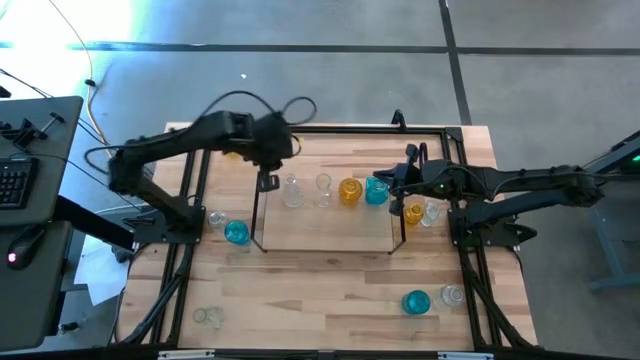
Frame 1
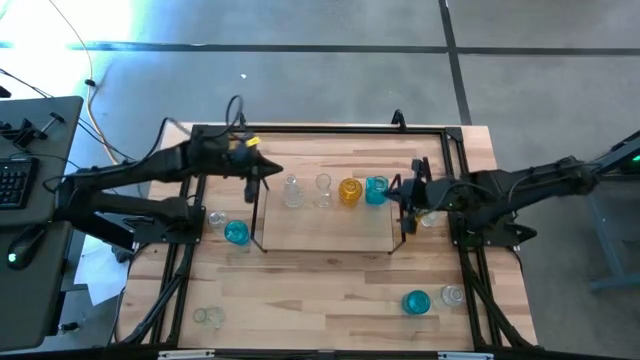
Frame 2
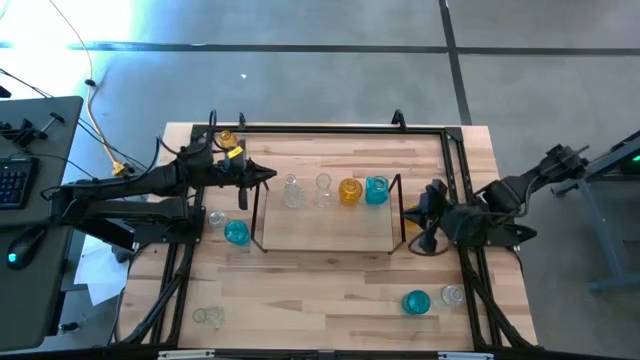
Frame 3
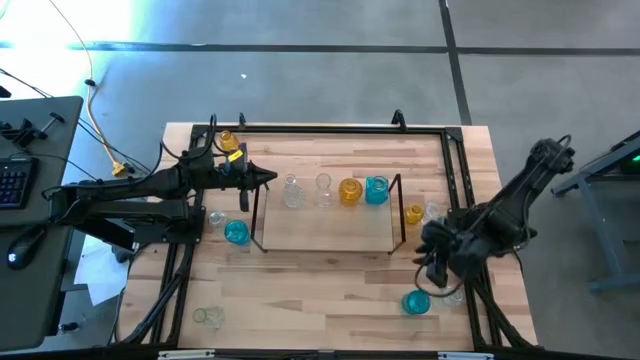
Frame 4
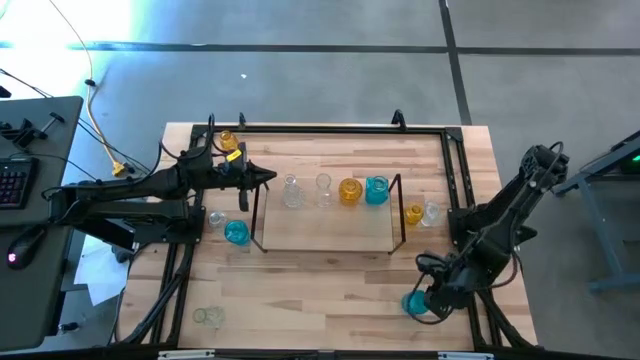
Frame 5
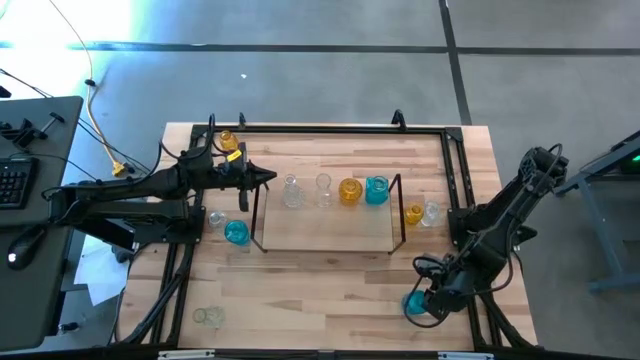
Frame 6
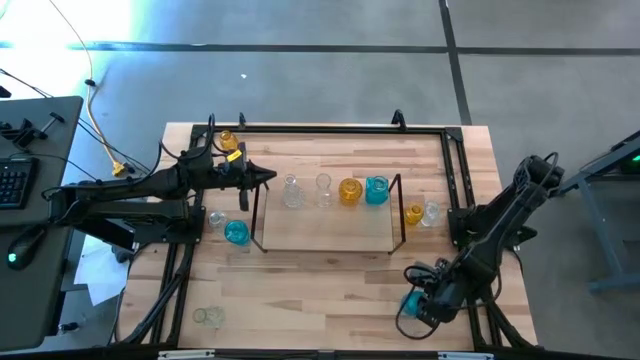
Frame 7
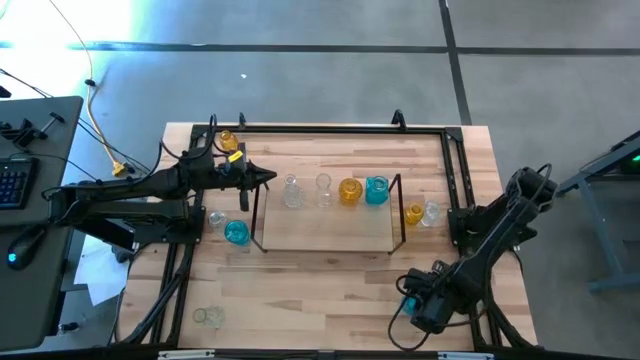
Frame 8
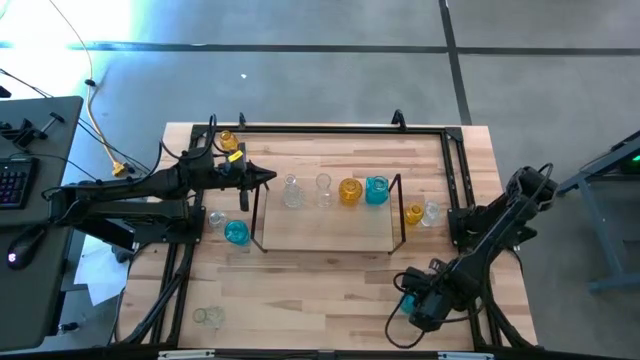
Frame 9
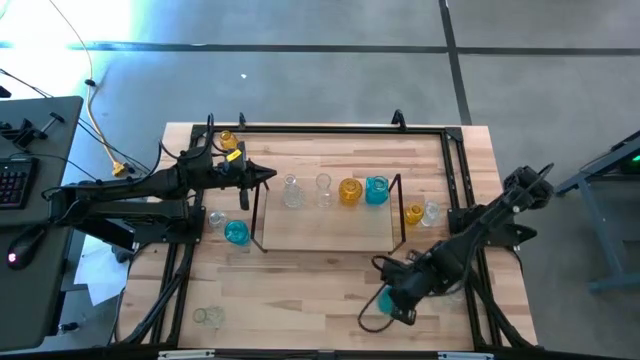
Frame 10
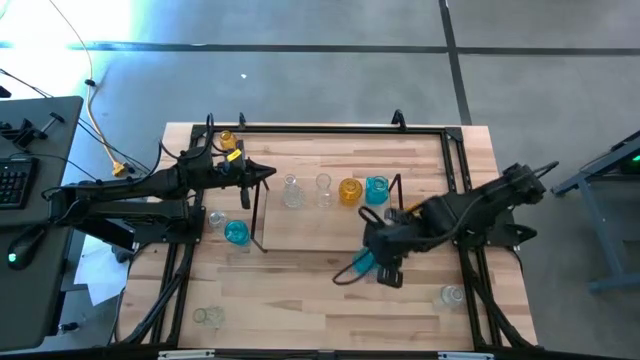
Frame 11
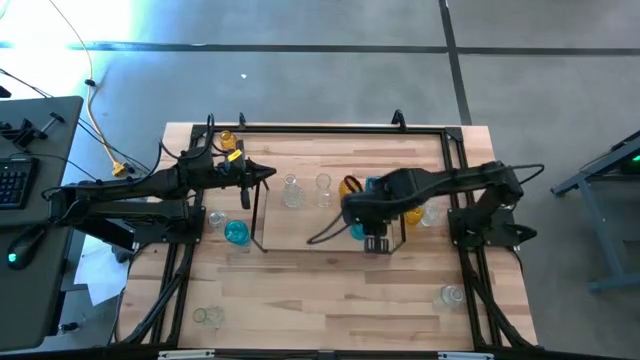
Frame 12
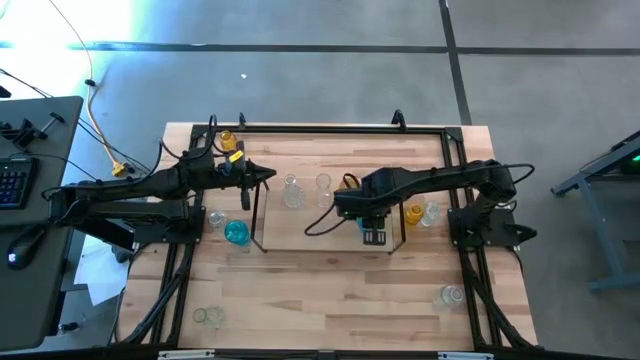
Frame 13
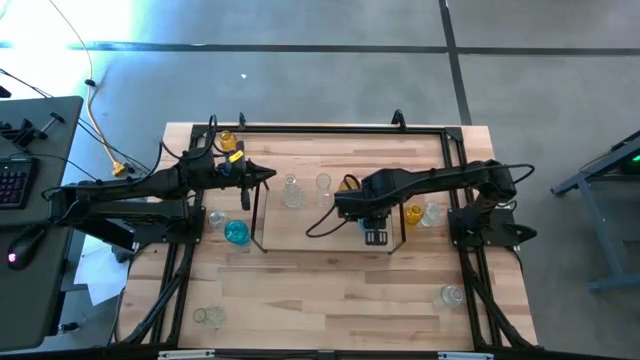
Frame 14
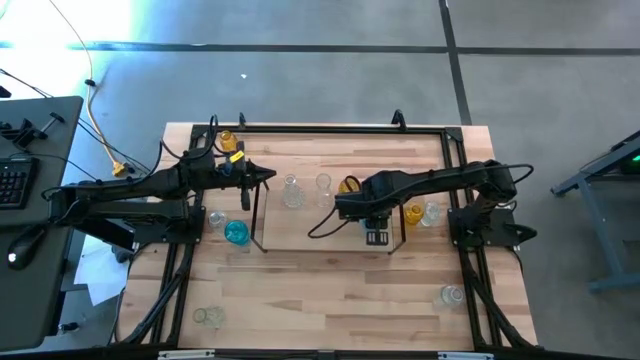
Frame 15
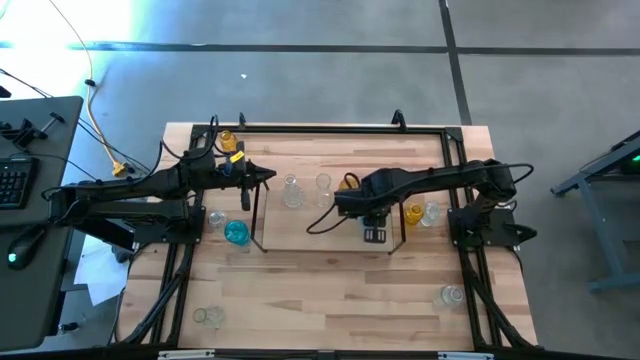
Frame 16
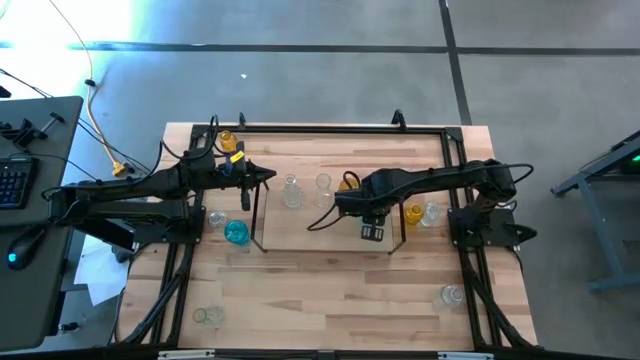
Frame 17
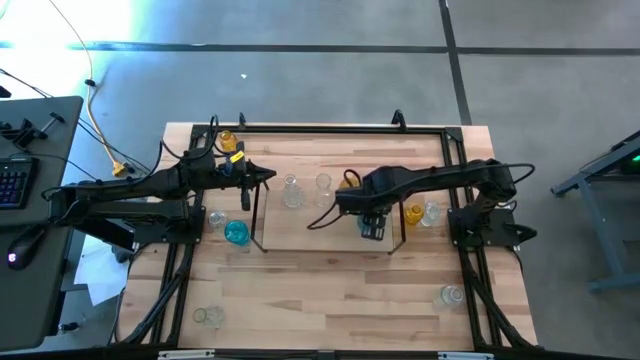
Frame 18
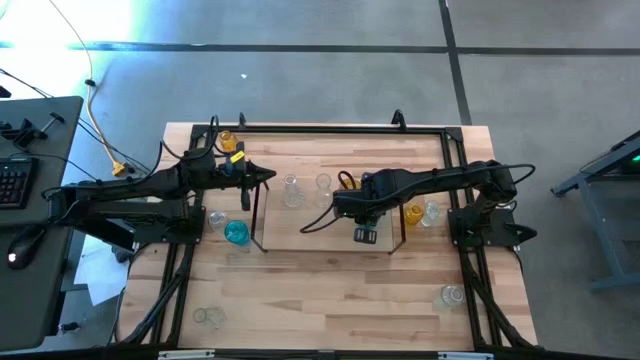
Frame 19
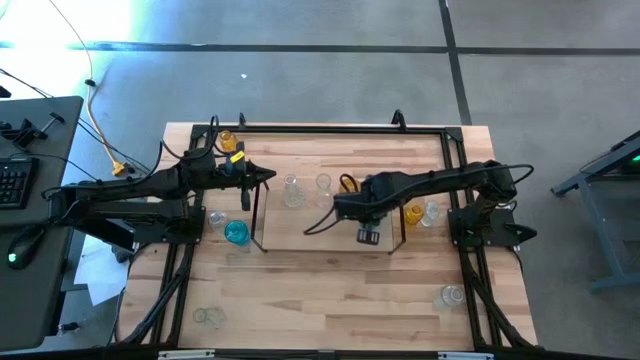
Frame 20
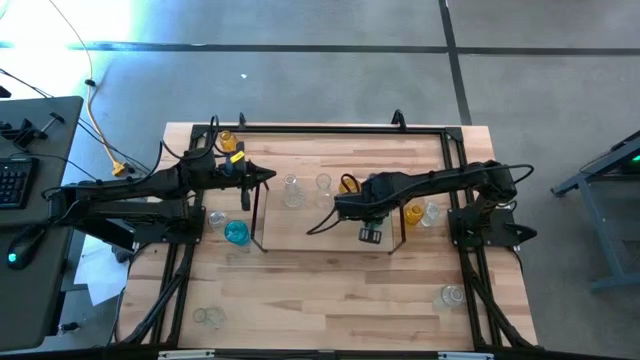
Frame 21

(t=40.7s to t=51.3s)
Task: sort vases onto shelf
Put the blue vase on the shelf aligned with the other blue vase

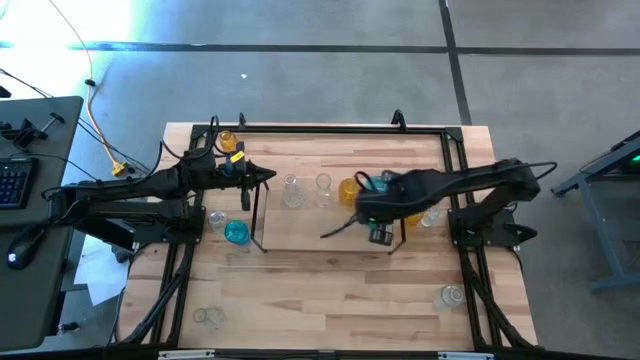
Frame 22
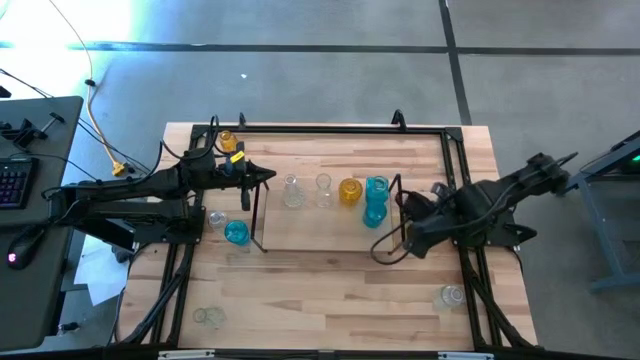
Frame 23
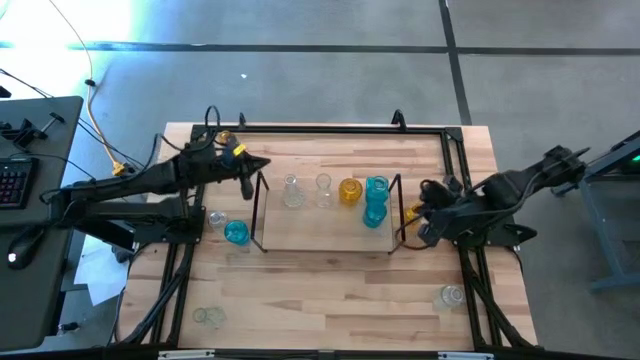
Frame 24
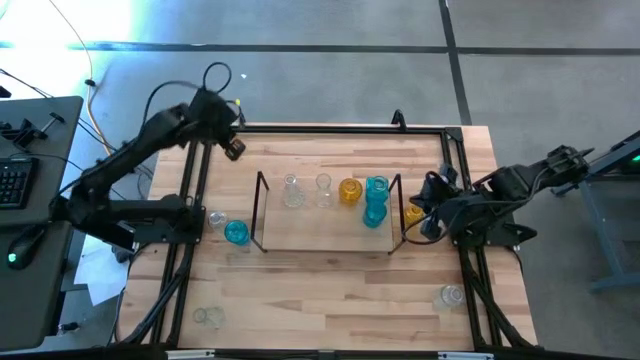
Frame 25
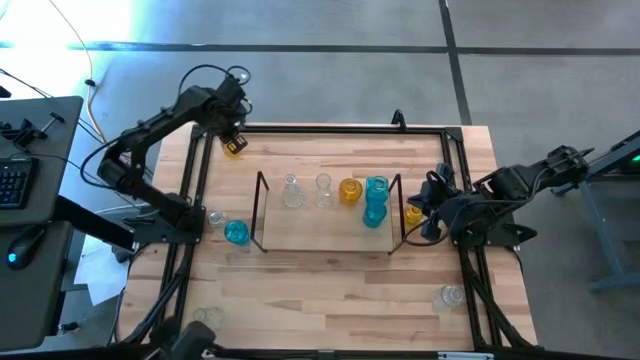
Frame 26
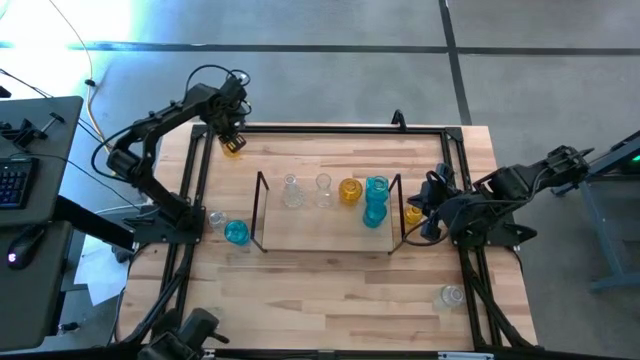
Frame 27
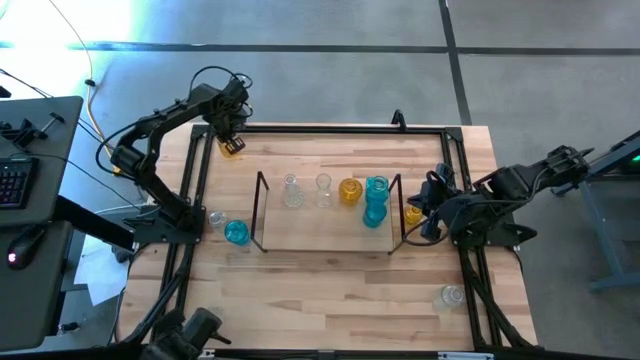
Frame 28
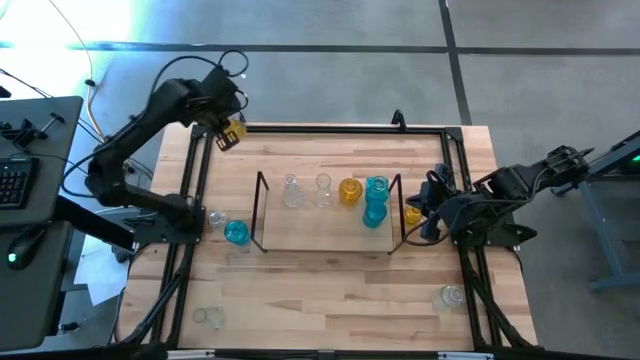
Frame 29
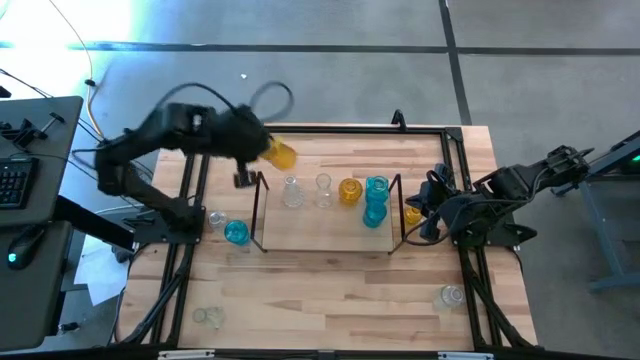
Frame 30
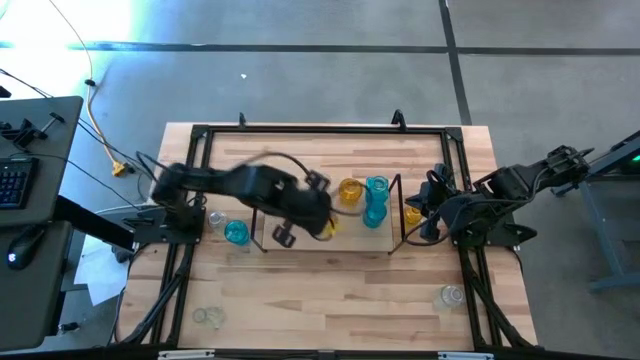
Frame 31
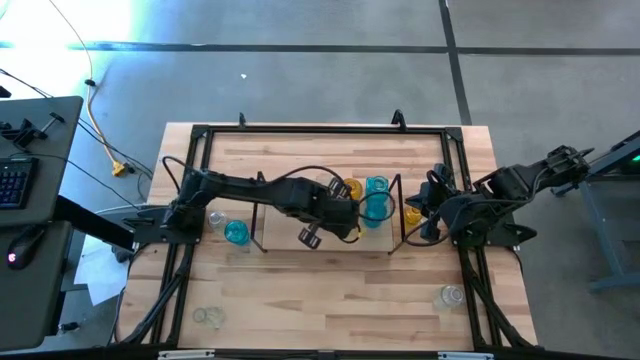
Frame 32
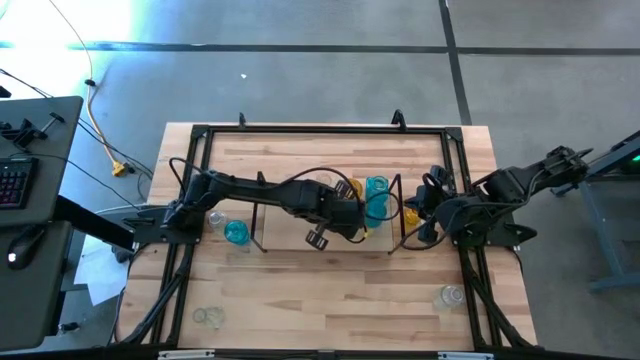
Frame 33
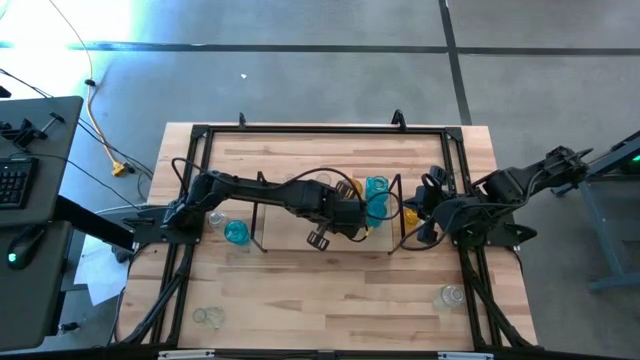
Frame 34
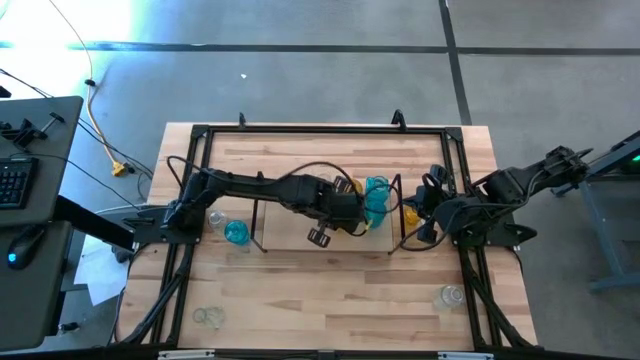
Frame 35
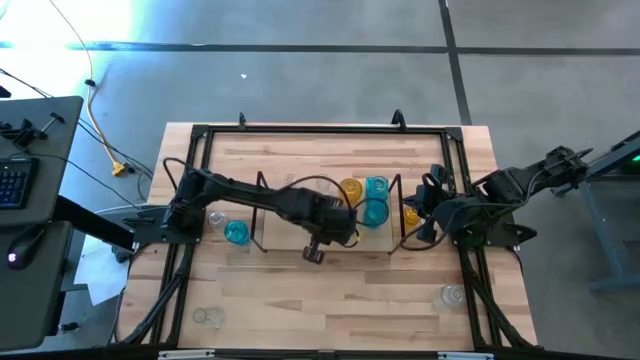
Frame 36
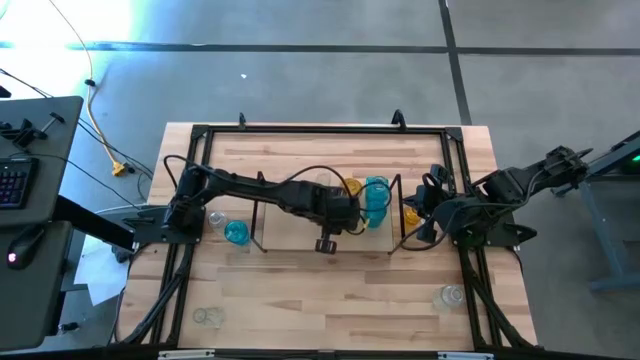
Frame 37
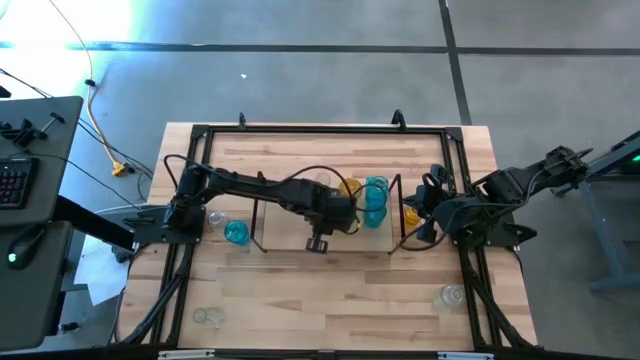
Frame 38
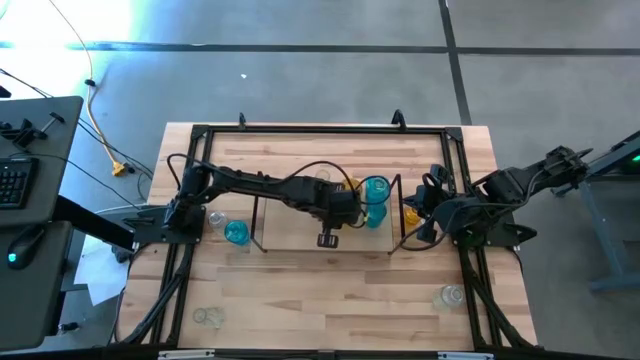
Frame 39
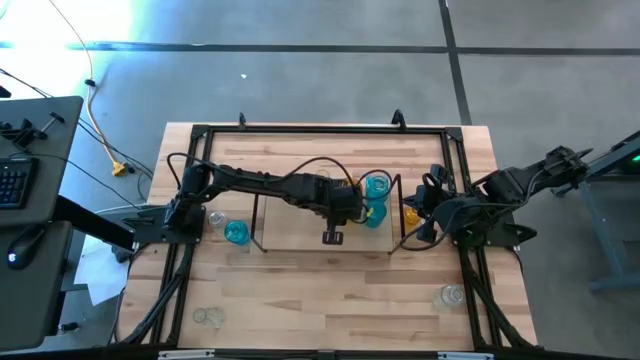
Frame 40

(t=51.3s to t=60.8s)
Put the yellow vase on the shelf aligned with the other yellow vase

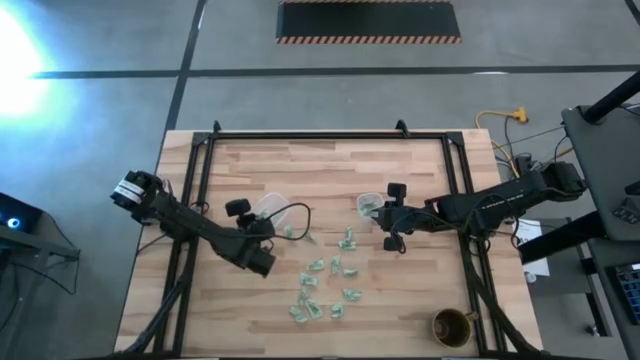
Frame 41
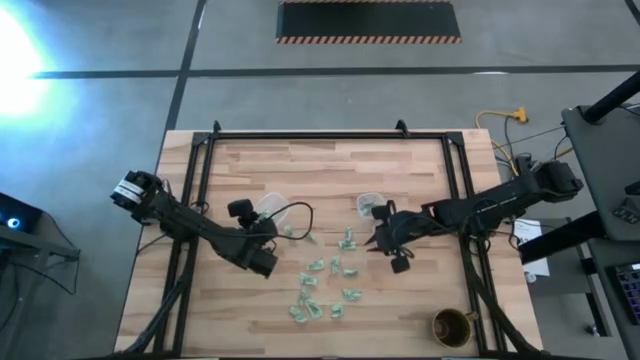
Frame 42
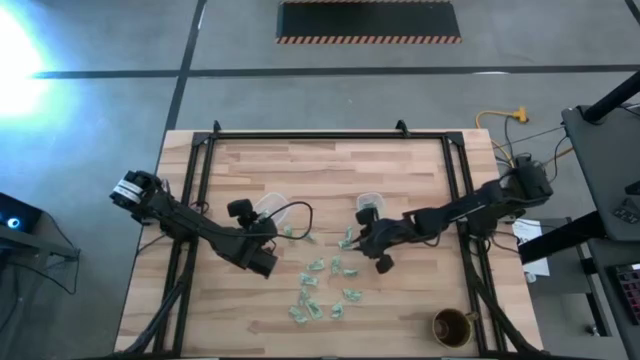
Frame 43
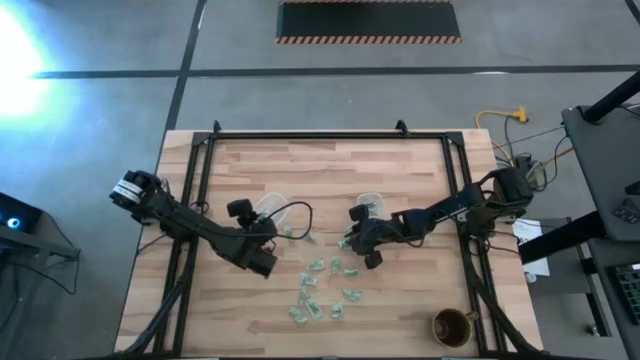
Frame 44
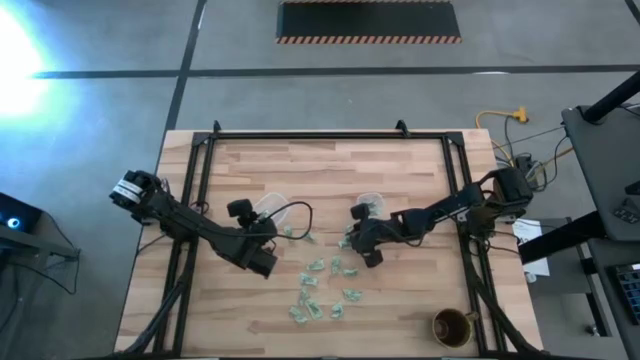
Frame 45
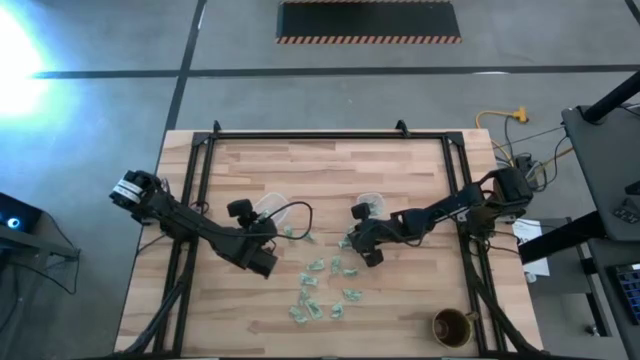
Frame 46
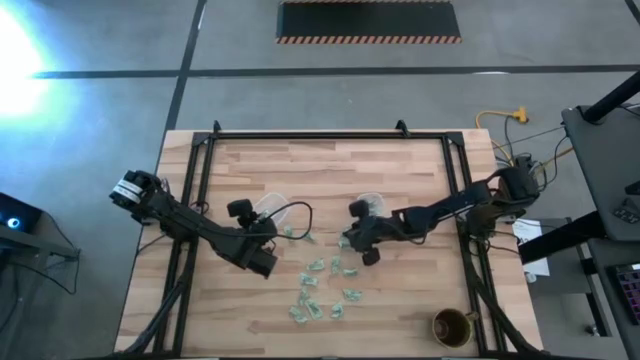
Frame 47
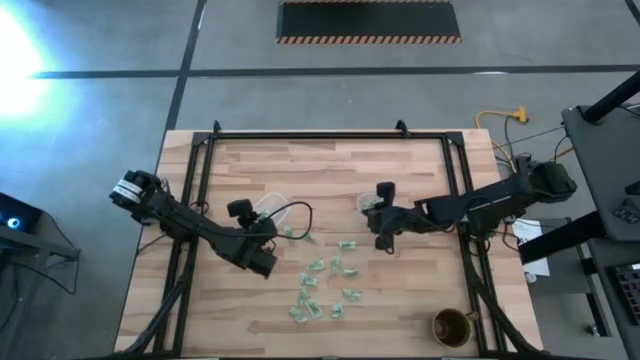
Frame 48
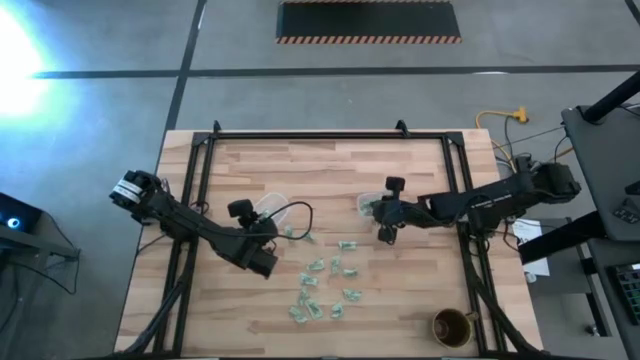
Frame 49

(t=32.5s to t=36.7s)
Task: Pick and place Stevia / Truvia into bins
Put the light green stevia packet into the right transparent container
